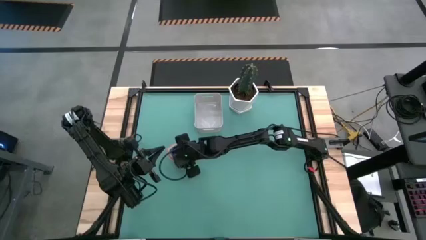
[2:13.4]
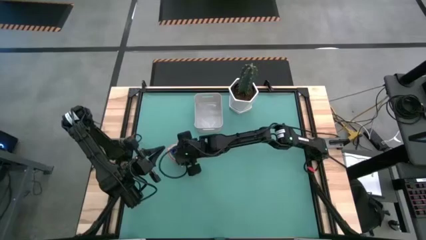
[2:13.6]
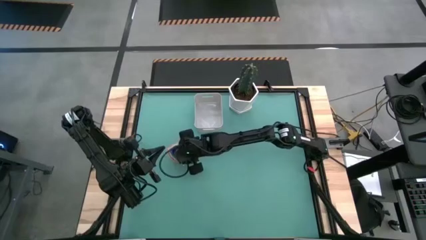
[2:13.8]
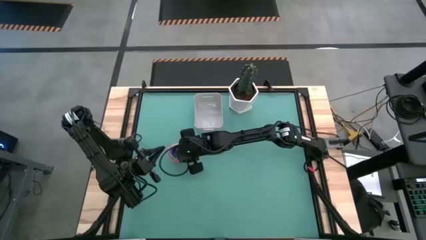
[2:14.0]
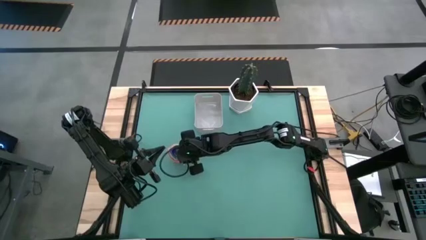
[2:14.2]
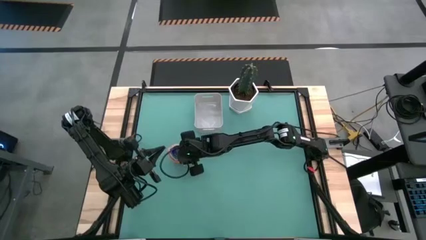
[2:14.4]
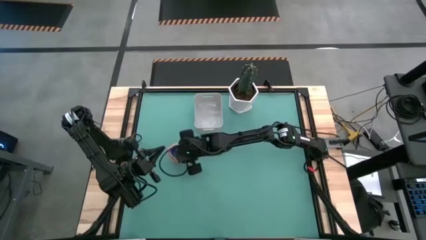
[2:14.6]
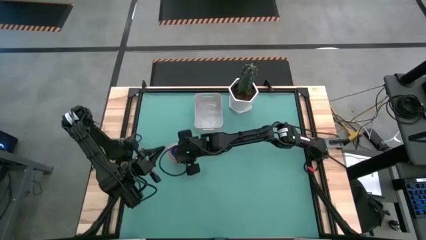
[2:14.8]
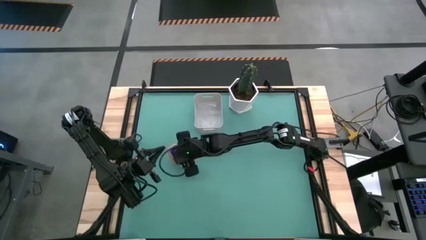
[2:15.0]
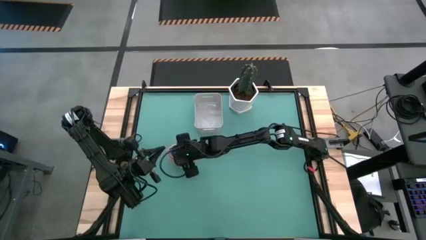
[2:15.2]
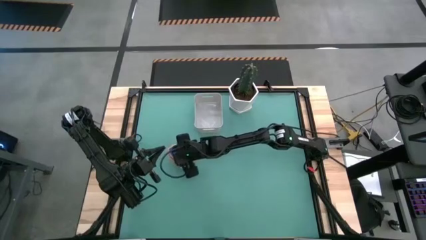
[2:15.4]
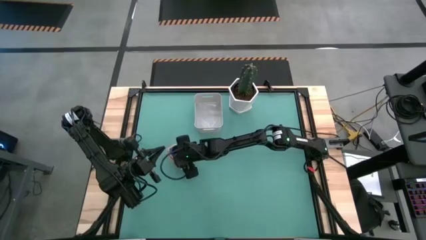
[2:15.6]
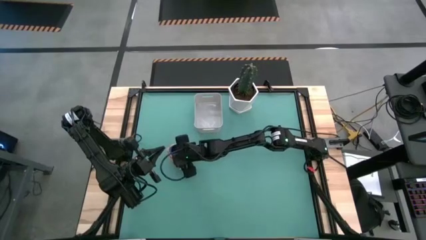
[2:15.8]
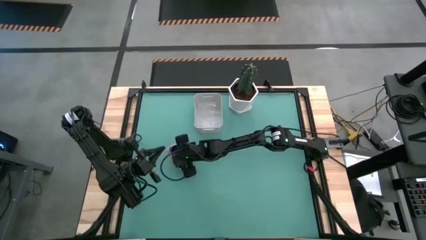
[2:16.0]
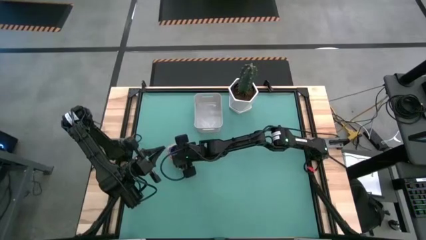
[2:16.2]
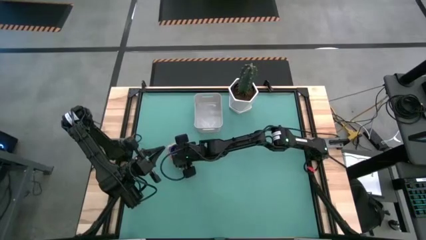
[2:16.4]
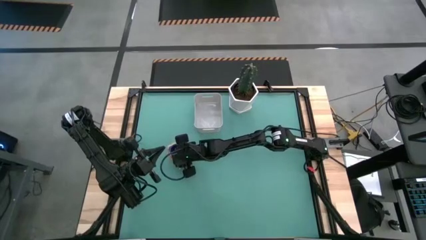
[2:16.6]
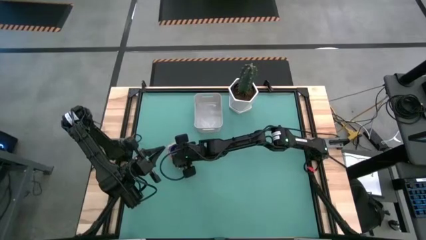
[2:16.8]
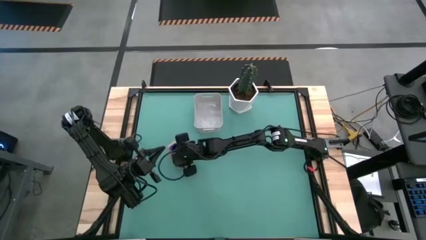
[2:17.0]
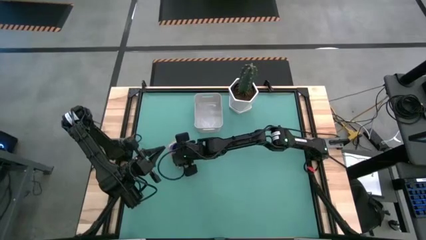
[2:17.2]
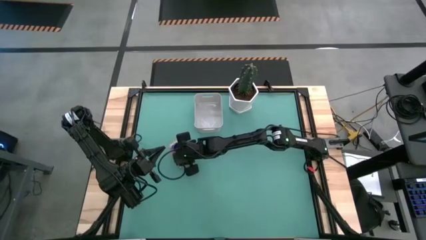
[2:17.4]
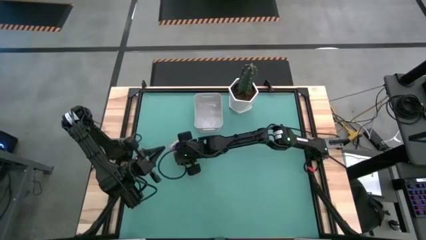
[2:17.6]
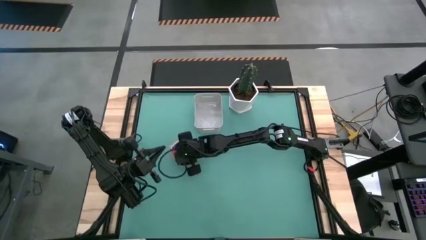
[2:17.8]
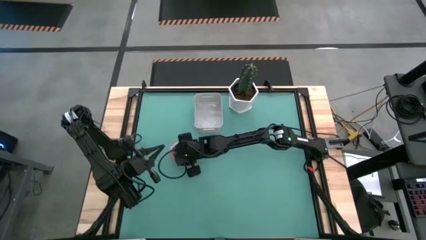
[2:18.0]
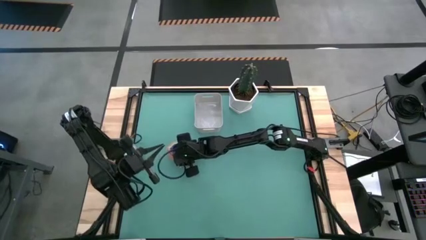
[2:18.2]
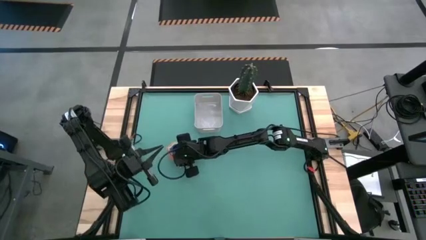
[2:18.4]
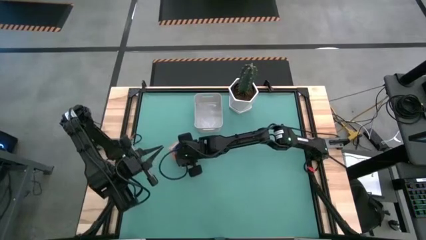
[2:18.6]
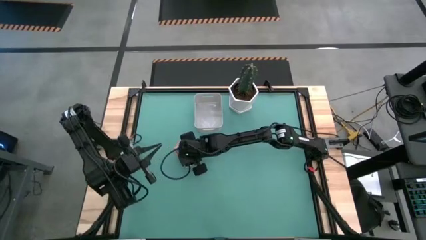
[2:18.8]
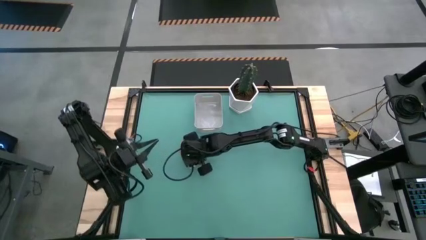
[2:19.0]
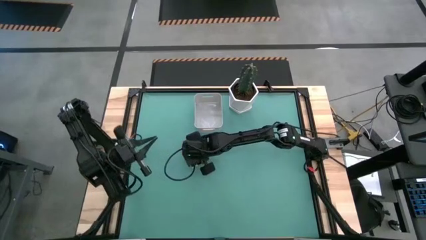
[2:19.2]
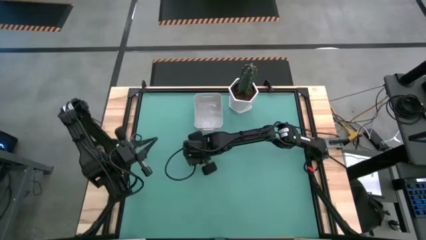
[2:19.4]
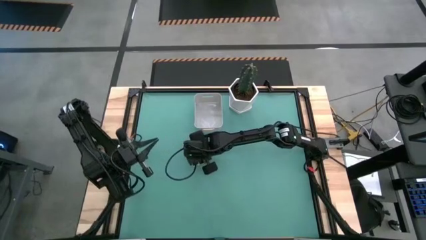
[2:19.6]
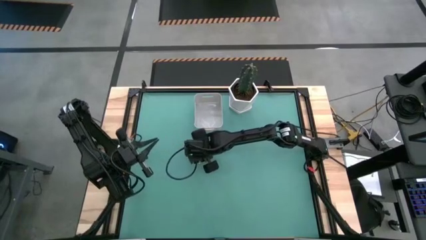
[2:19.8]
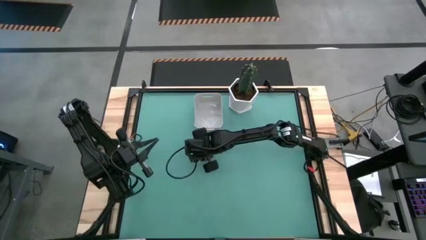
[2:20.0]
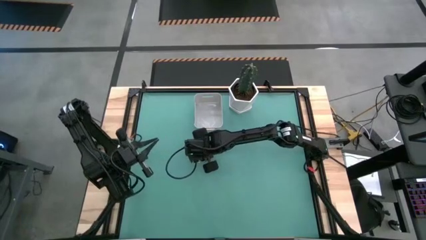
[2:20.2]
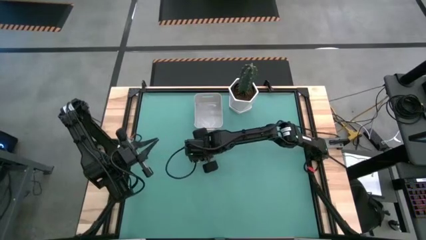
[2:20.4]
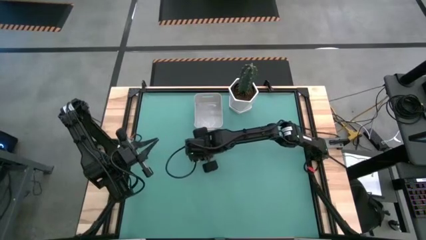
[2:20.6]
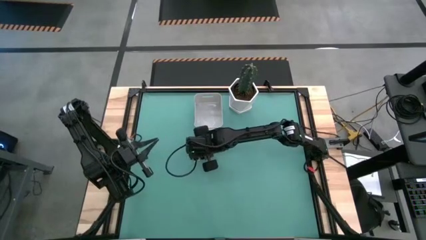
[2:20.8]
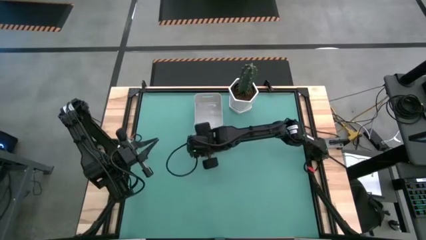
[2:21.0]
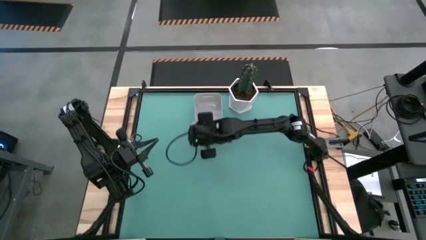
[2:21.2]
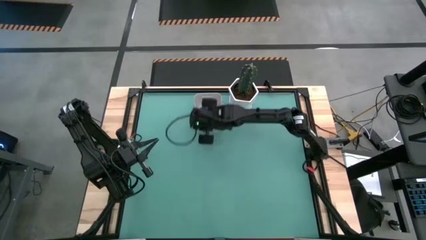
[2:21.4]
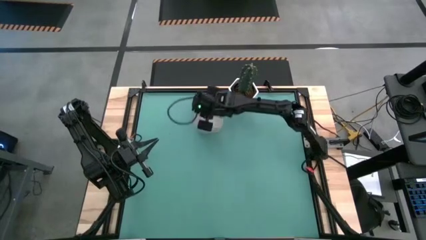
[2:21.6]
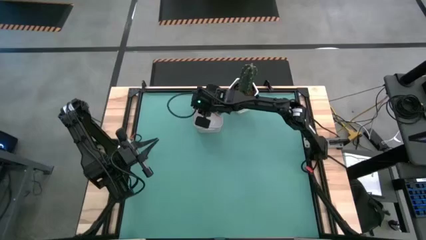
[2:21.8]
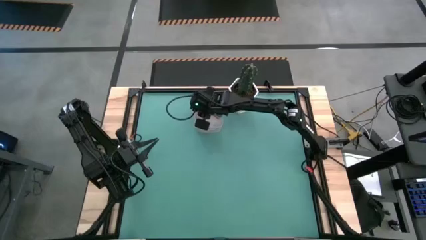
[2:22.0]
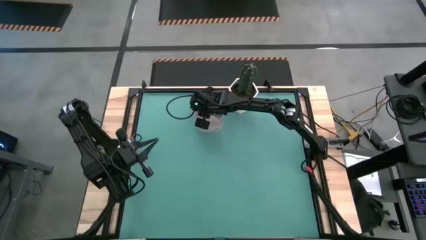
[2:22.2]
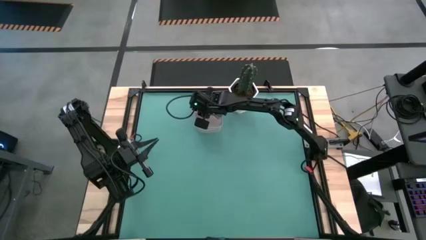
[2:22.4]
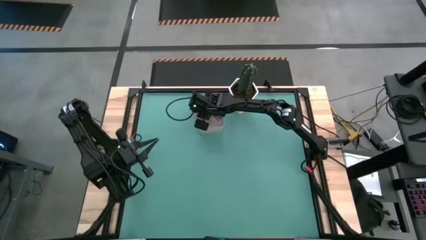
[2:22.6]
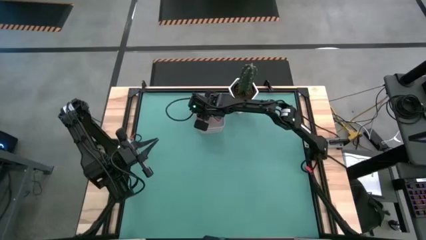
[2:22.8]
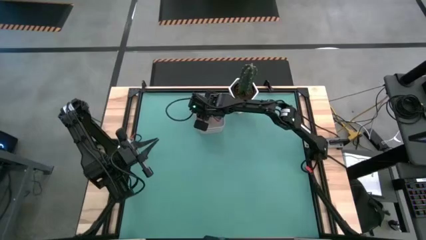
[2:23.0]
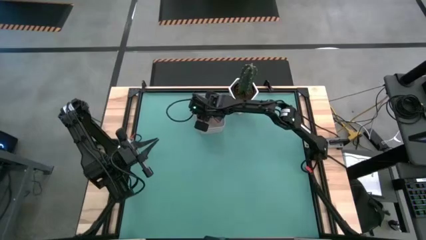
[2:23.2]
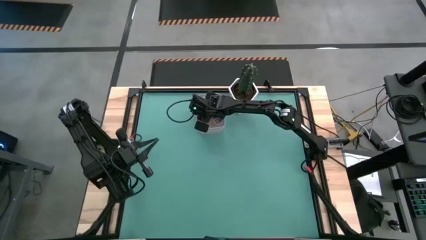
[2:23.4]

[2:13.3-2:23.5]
Task: Nest measuring cups in basket
Put the nested measuring cups into the gray bin

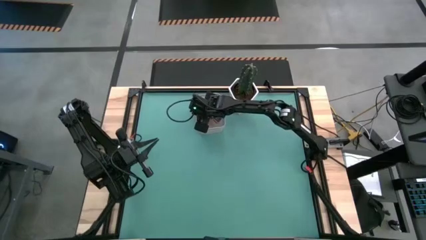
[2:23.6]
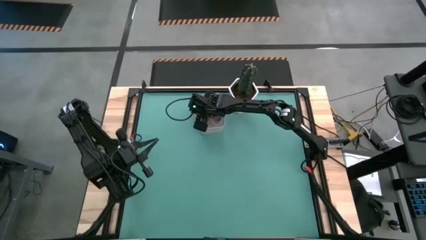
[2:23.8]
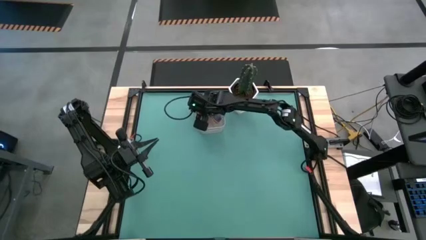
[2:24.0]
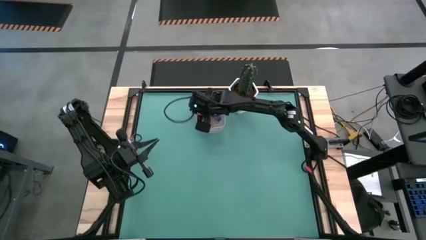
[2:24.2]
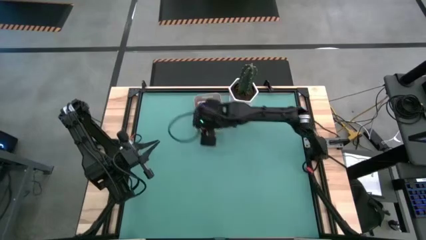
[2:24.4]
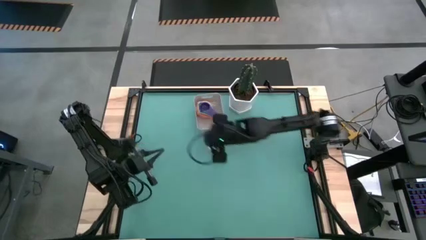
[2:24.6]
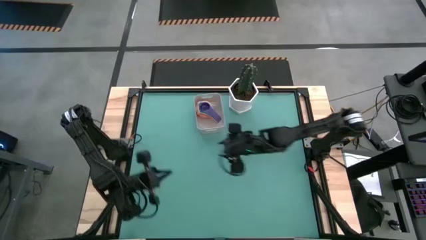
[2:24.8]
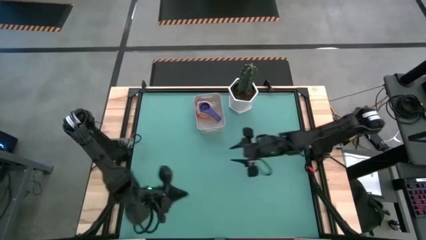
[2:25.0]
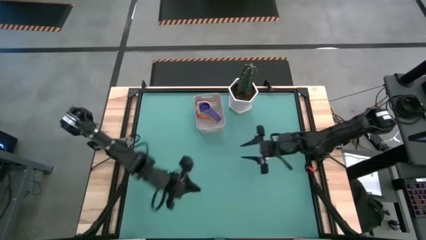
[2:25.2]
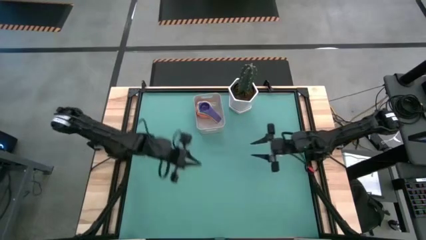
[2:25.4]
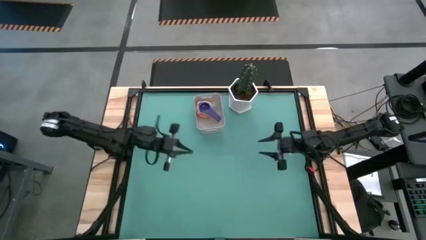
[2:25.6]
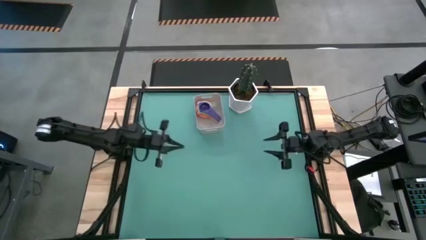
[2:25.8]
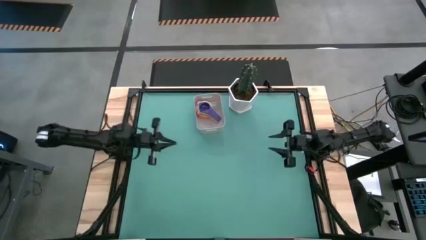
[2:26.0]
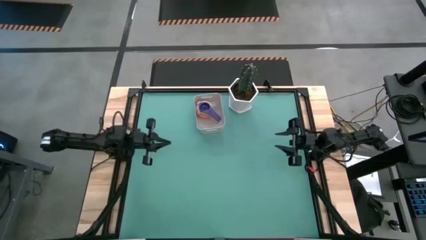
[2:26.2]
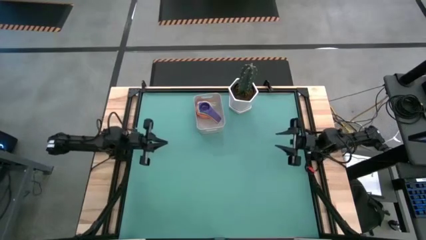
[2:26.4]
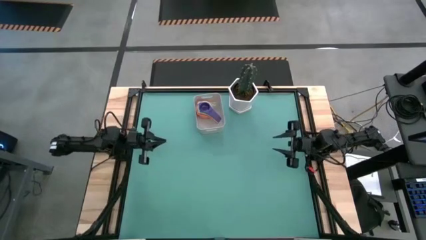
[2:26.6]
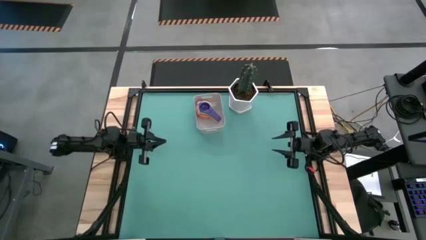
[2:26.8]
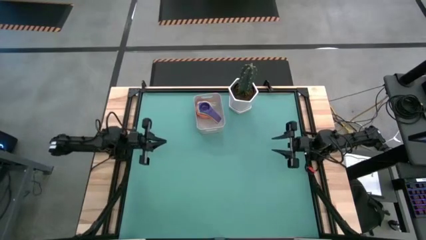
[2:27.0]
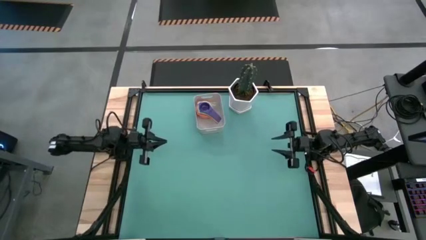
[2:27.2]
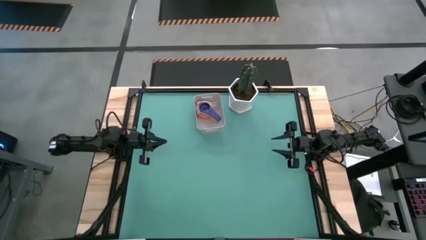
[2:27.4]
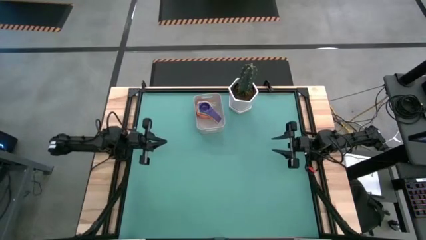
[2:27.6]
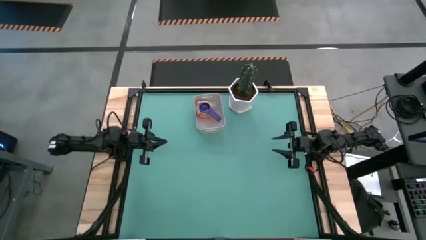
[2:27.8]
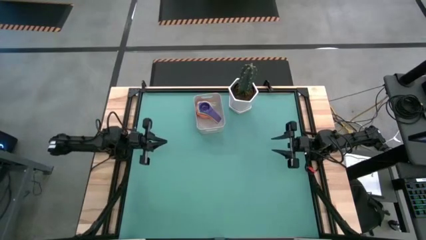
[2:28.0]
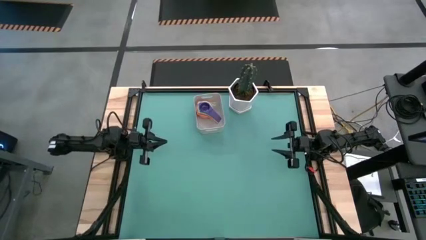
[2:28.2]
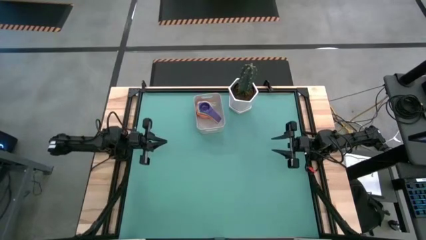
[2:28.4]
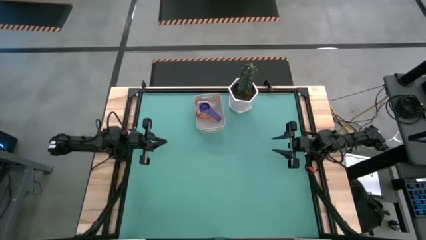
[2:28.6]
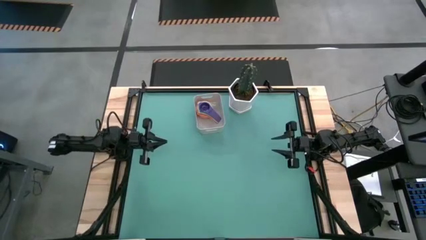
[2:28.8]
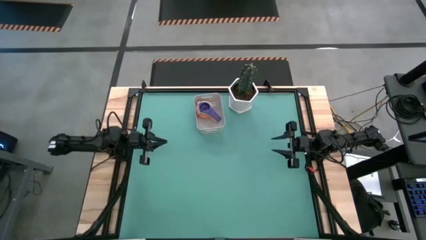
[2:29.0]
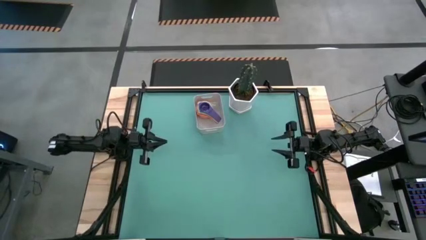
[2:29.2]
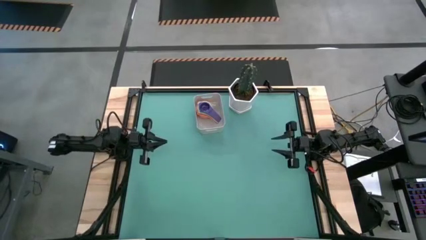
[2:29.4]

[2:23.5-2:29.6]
Return to Home Position
